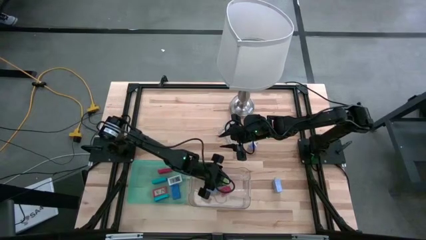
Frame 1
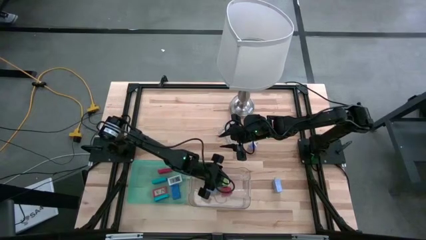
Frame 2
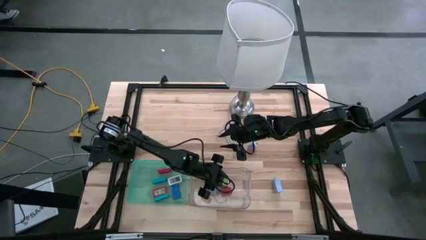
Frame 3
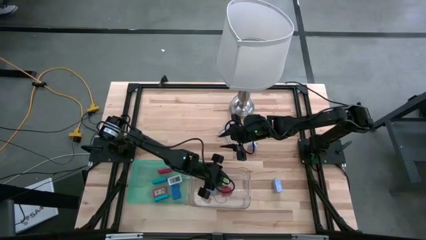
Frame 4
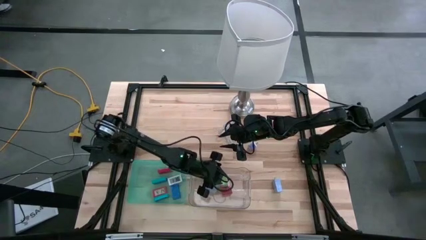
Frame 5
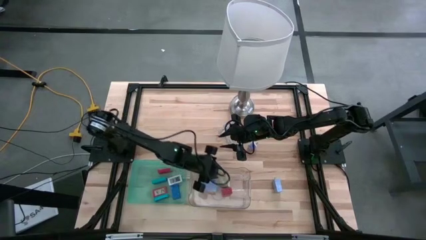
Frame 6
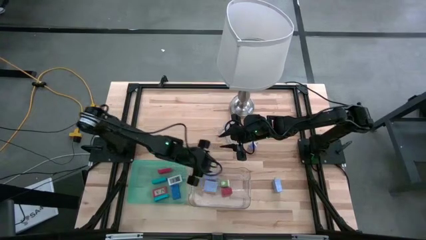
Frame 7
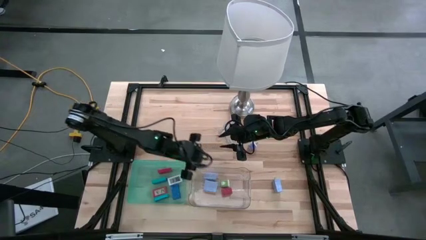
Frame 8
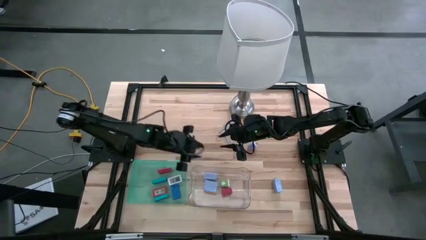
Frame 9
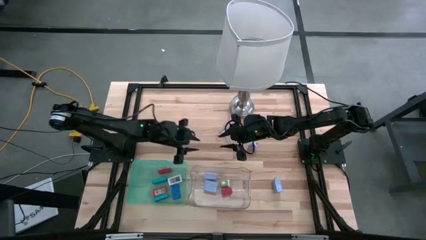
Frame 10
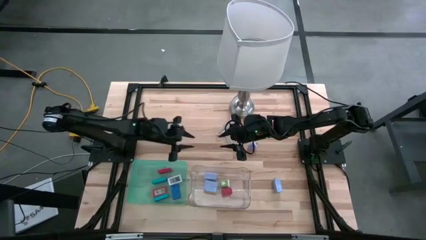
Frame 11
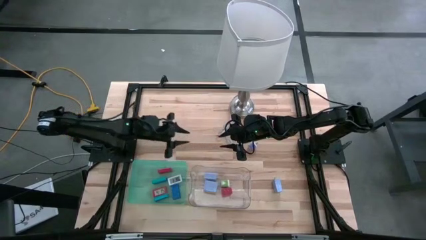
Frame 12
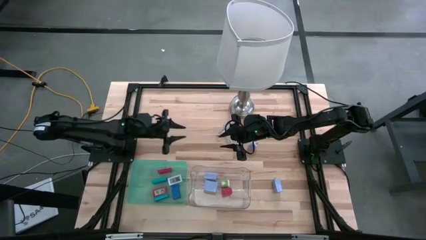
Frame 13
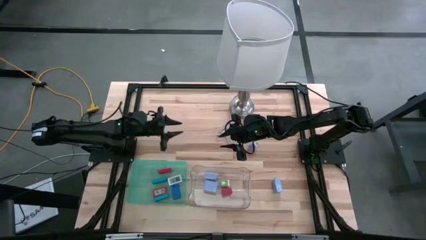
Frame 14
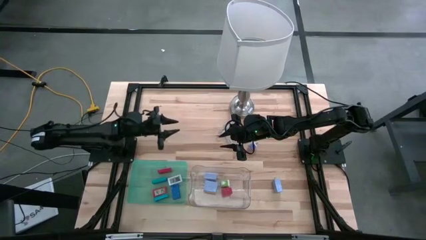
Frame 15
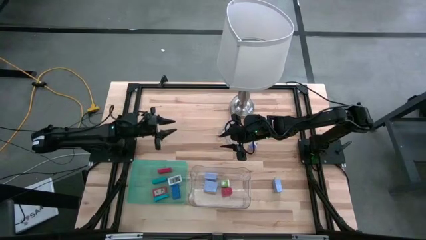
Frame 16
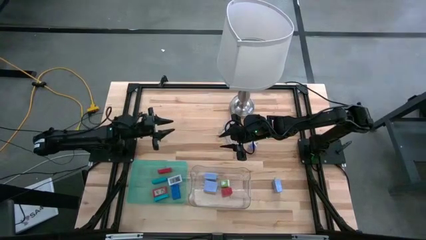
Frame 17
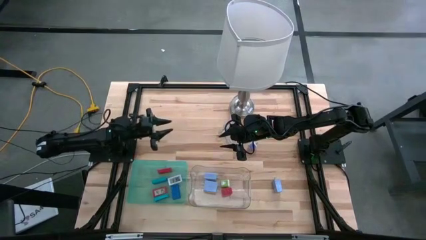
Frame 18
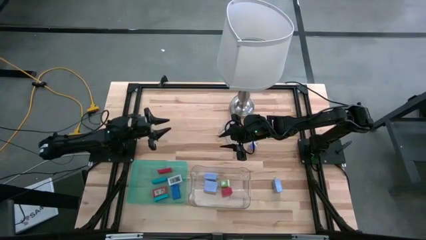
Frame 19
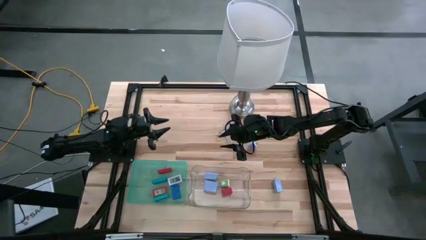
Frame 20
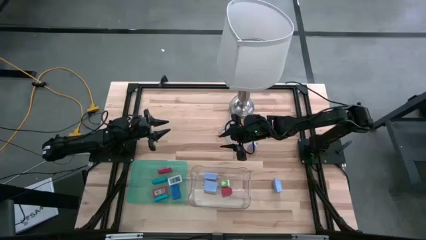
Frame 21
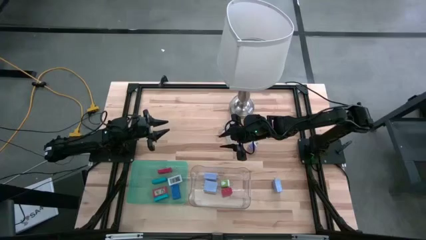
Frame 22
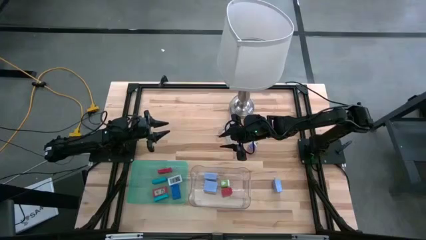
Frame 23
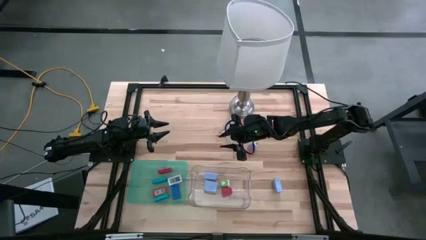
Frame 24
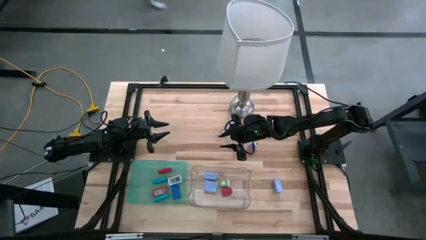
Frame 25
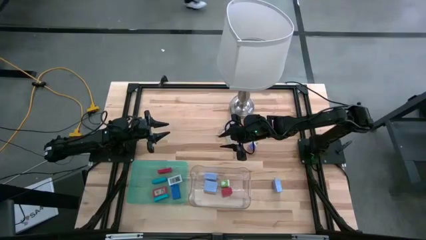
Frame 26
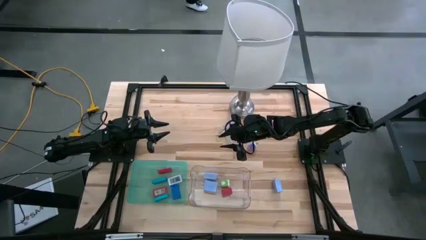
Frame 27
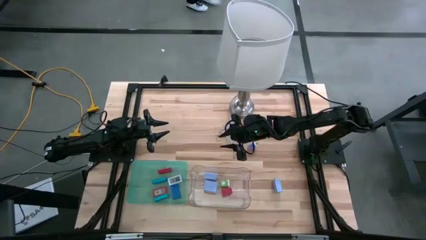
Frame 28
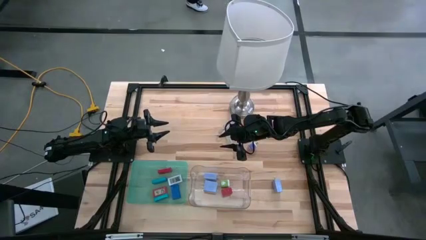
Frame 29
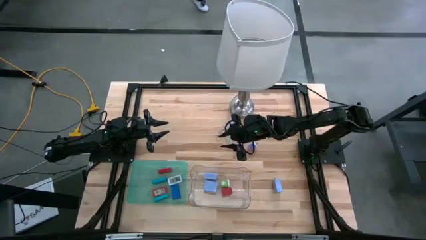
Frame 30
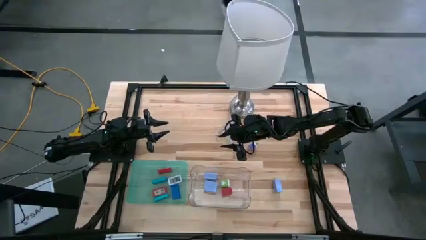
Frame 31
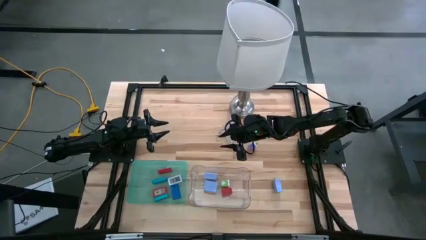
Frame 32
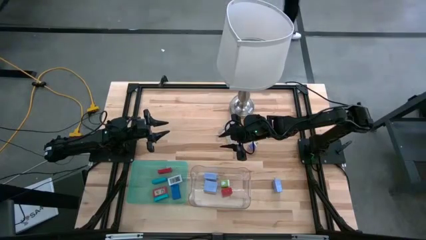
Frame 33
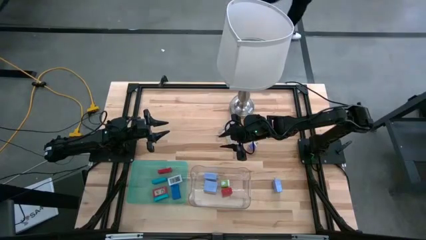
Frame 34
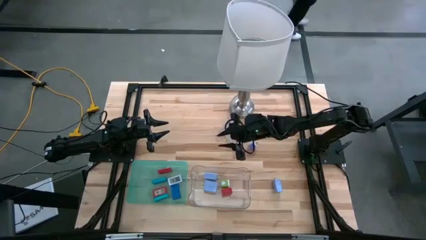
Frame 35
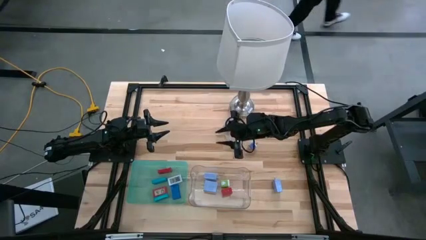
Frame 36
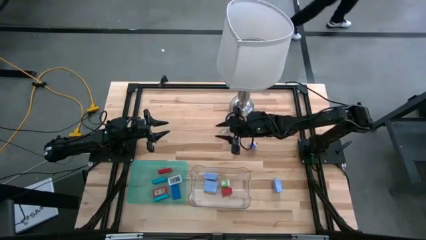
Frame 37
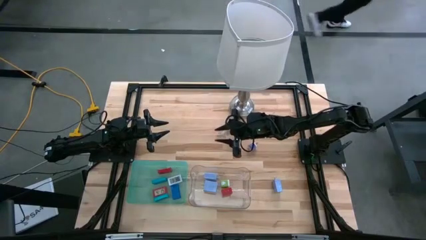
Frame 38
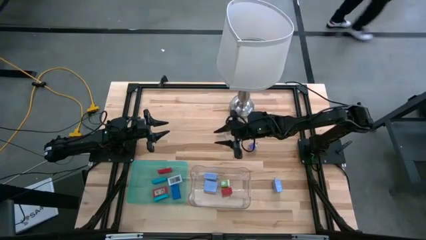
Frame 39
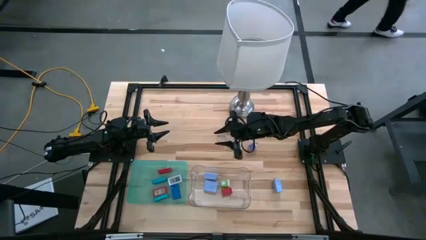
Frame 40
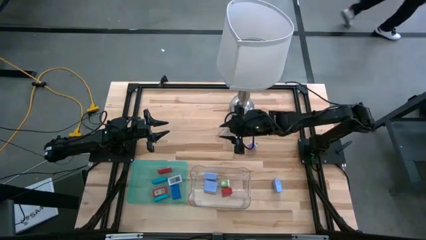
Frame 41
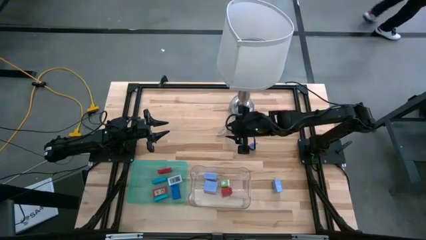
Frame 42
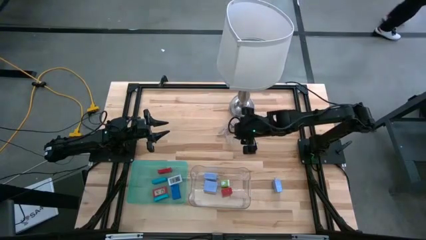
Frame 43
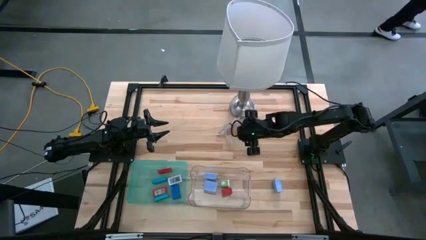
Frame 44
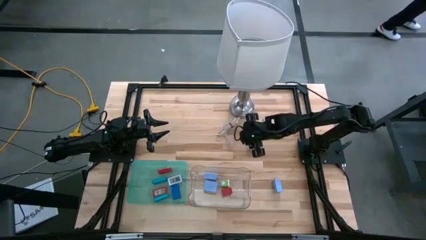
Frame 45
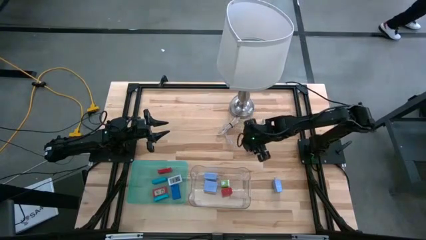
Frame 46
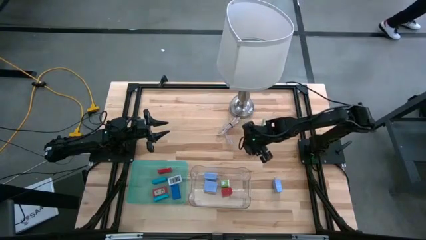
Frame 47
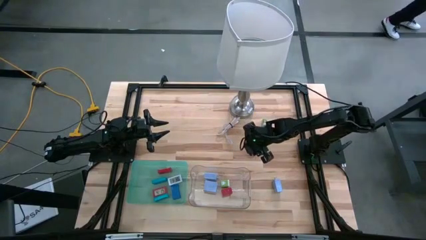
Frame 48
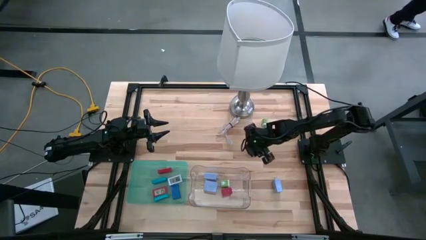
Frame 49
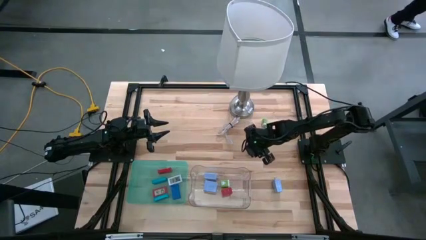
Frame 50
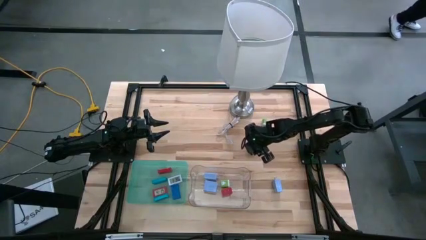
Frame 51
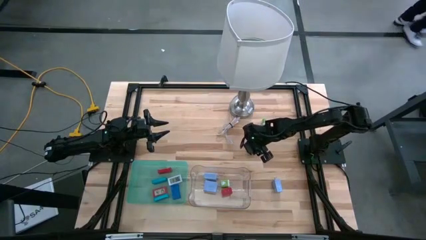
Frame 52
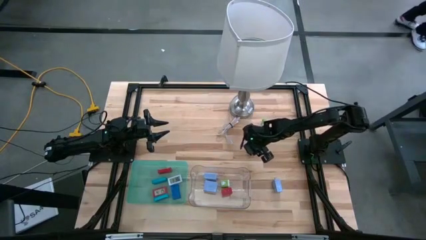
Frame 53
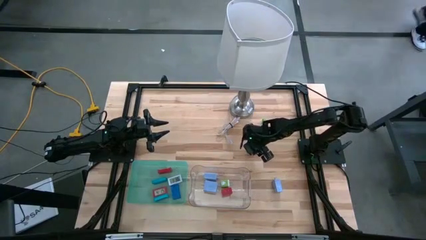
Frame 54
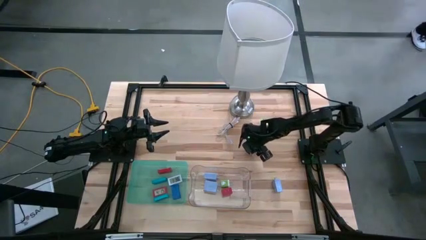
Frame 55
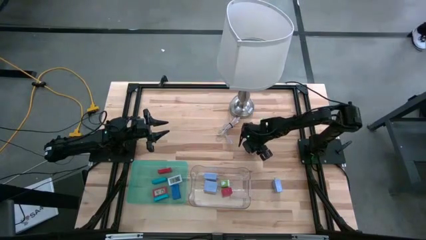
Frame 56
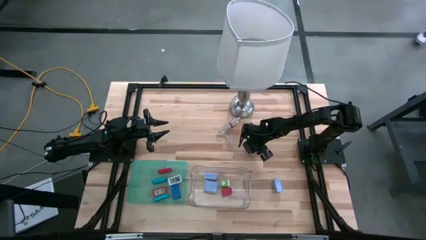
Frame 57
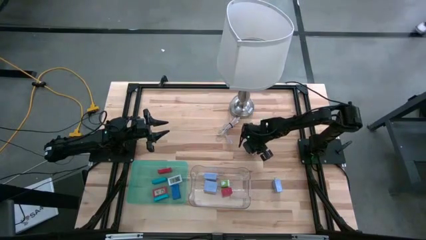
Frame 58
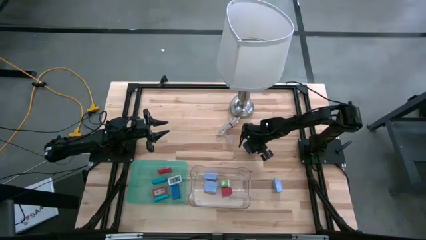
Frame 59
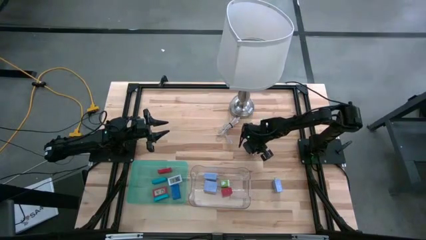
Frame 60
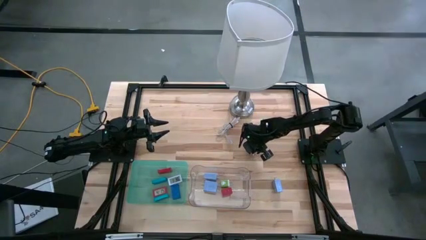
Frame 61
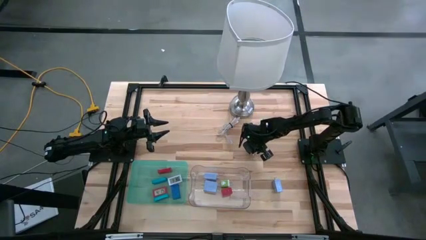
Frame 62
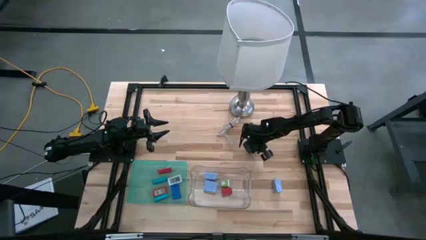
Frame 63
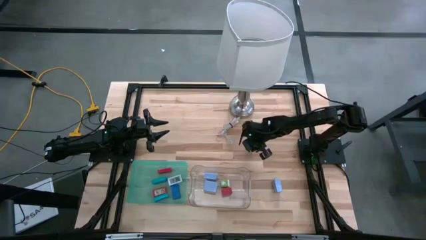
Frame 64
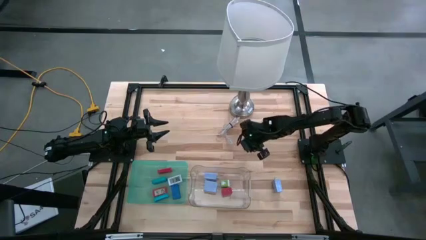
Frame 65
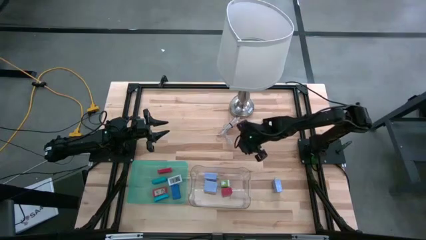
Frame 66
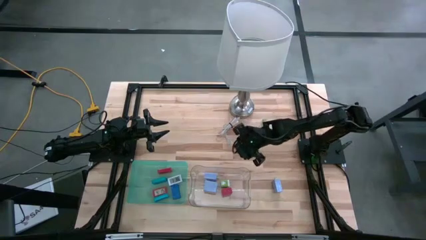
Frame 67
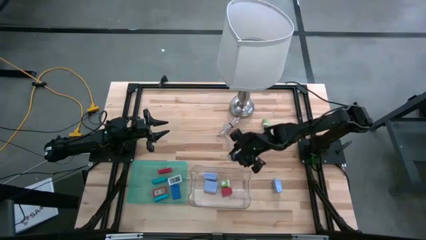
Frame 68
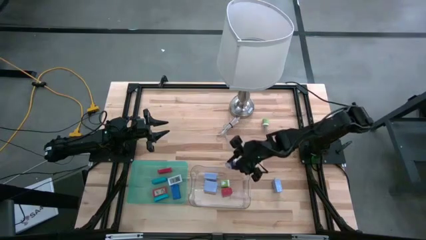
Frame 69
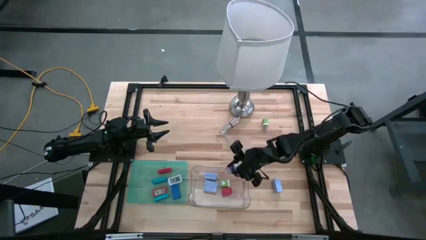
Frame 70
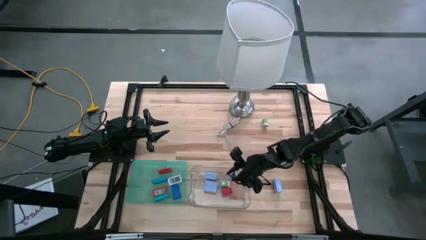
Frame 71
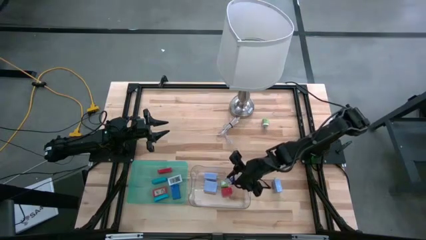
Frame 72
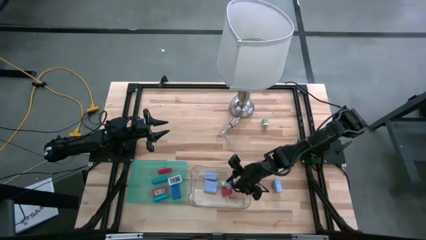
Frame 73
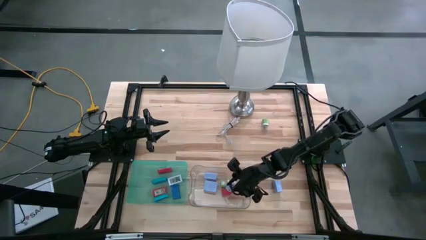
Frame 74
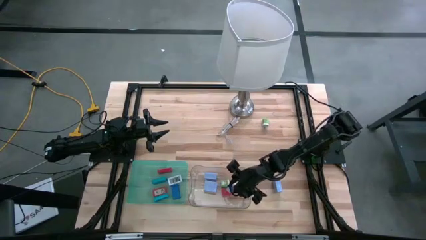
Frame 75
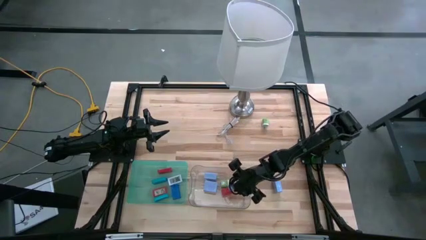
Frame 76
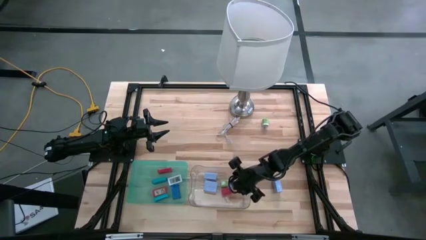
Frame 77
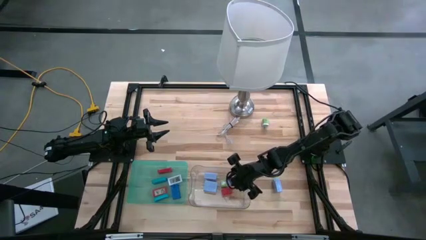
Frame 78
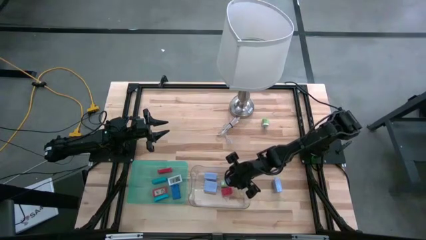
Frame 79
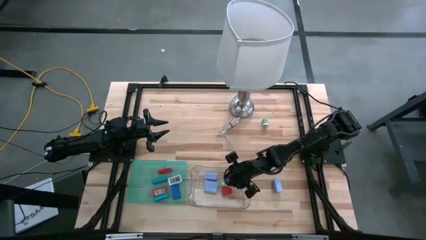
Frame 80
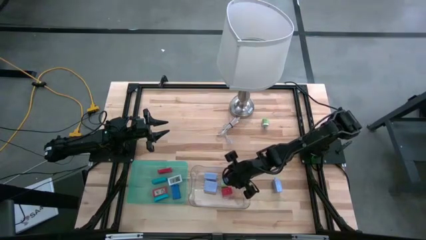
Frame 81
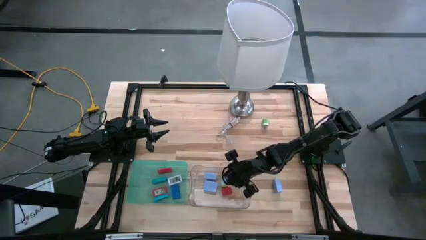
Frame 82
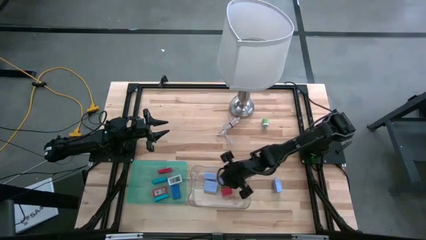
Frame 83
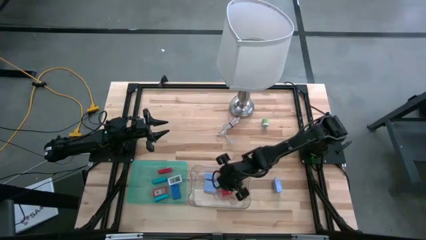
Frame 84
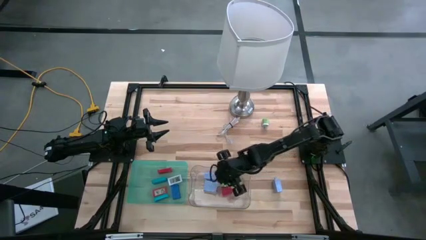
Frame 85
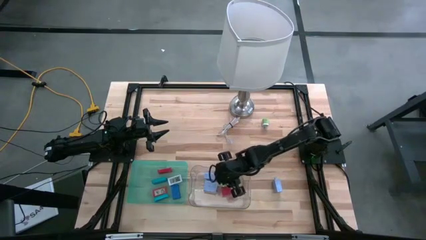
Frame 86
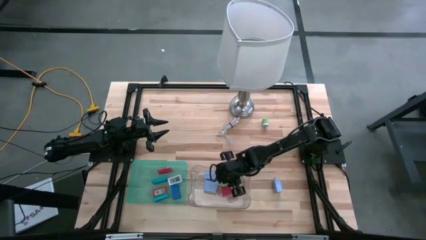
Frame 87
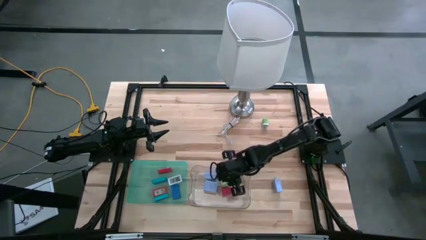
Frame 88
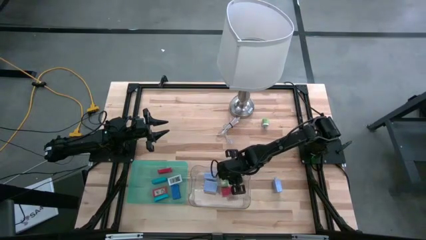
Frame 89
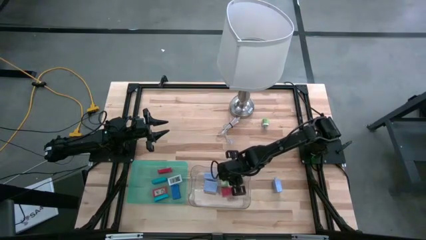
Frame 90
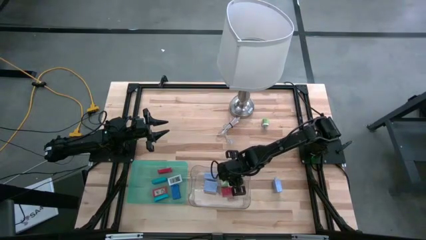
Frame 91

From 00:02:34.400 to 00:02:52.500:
Task: Pick & Place Office items
Put the violet charger adapter into the transparent bin
